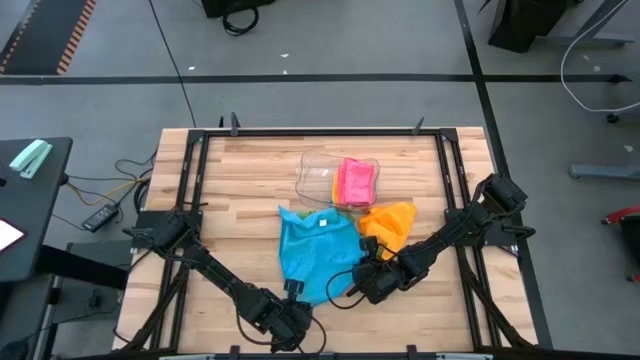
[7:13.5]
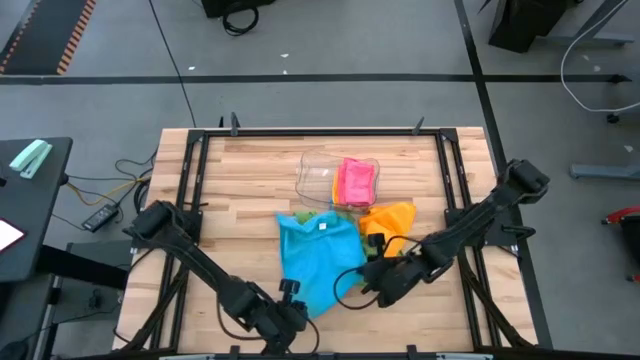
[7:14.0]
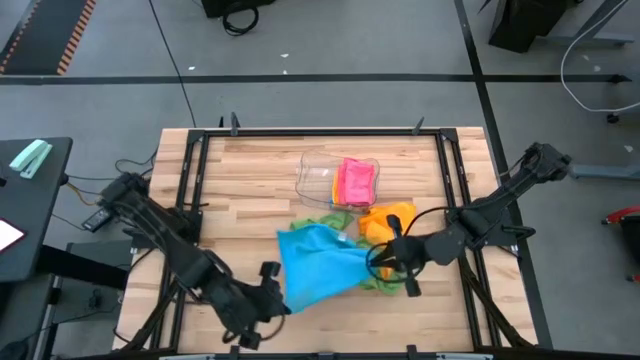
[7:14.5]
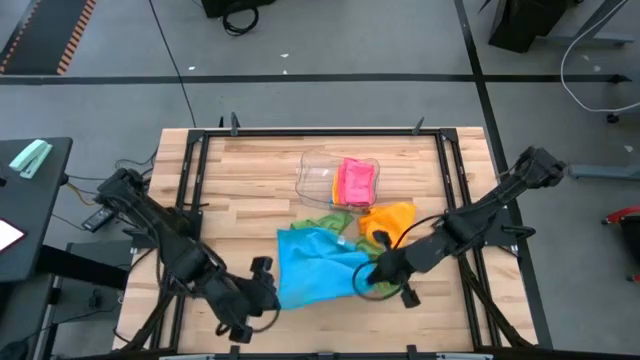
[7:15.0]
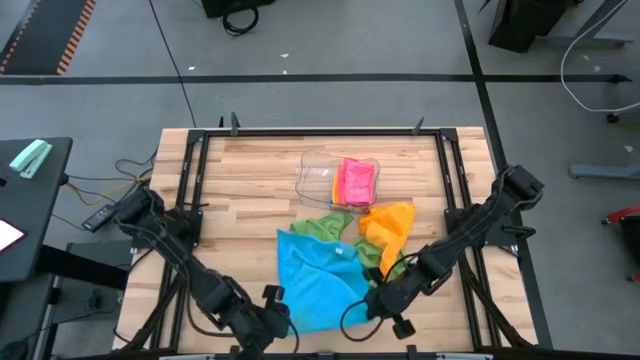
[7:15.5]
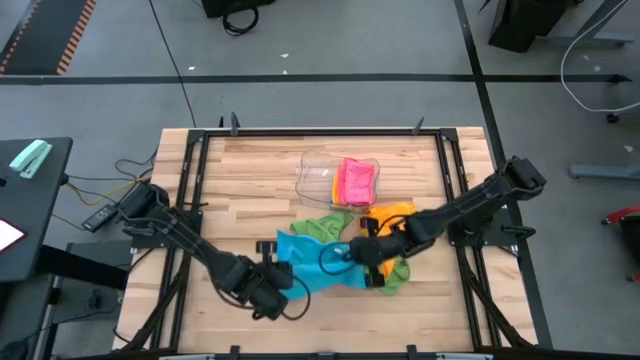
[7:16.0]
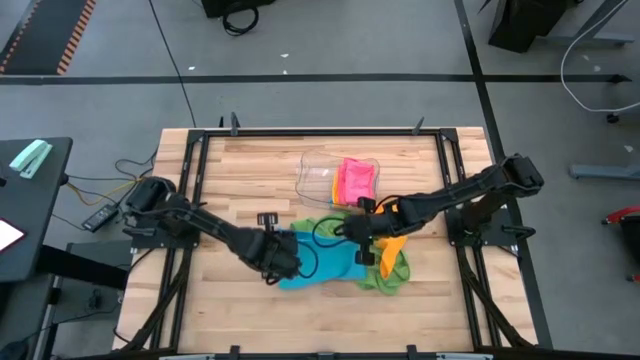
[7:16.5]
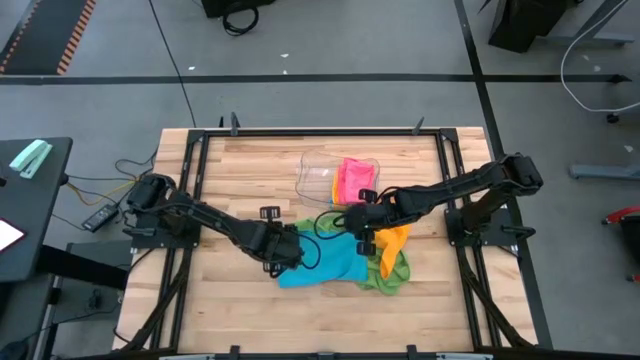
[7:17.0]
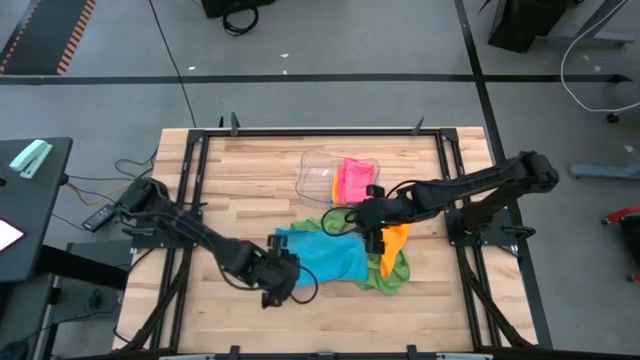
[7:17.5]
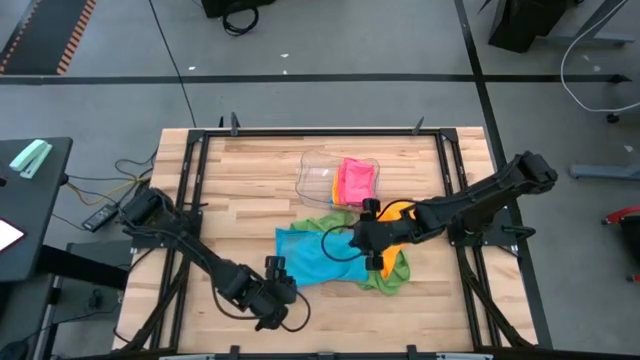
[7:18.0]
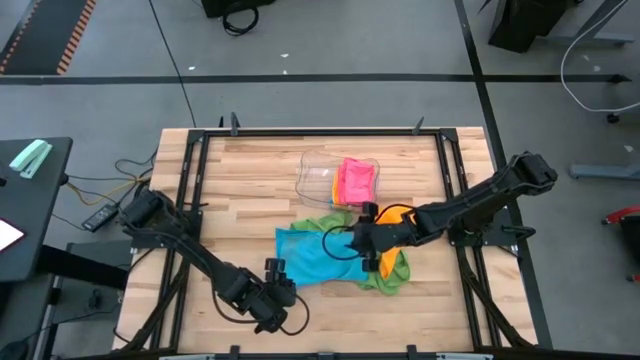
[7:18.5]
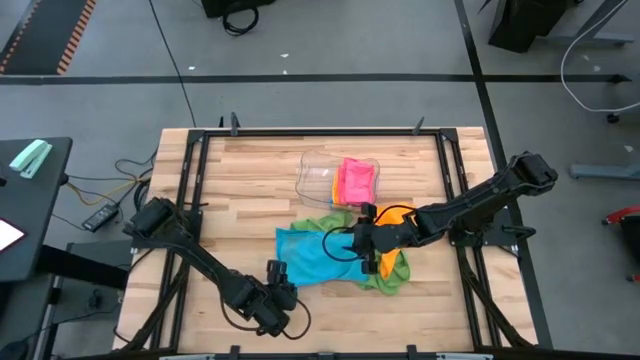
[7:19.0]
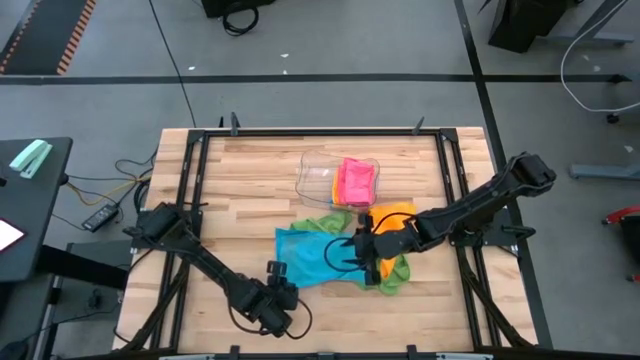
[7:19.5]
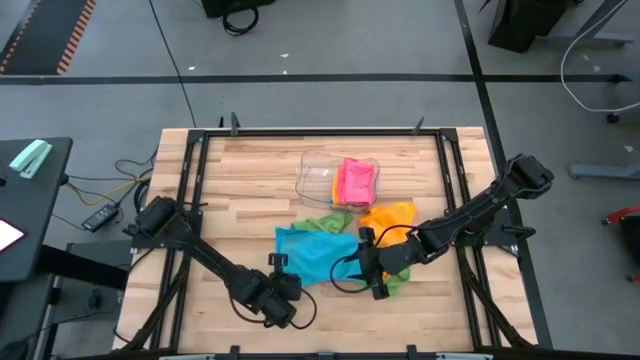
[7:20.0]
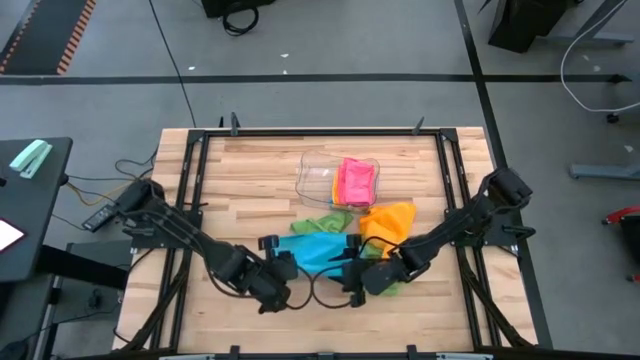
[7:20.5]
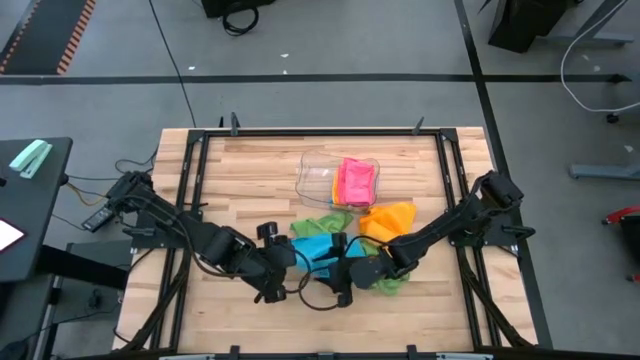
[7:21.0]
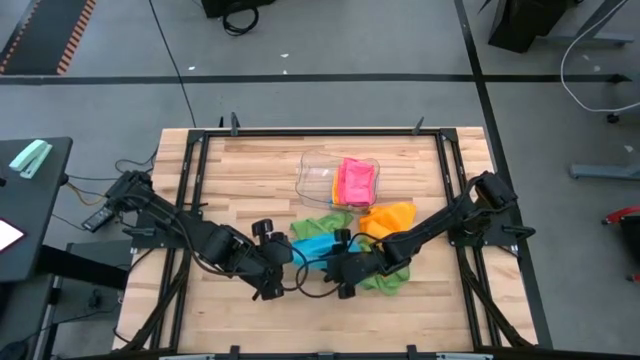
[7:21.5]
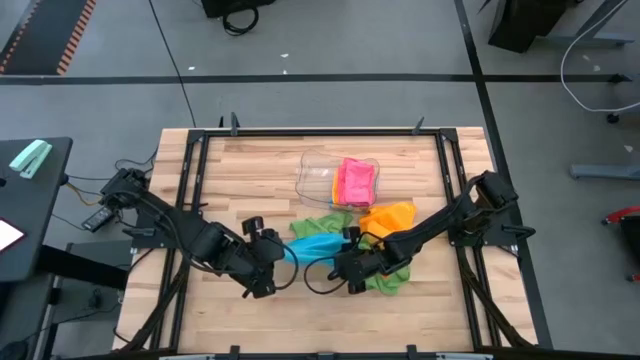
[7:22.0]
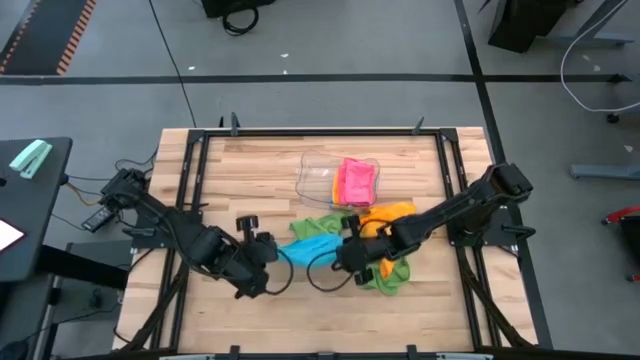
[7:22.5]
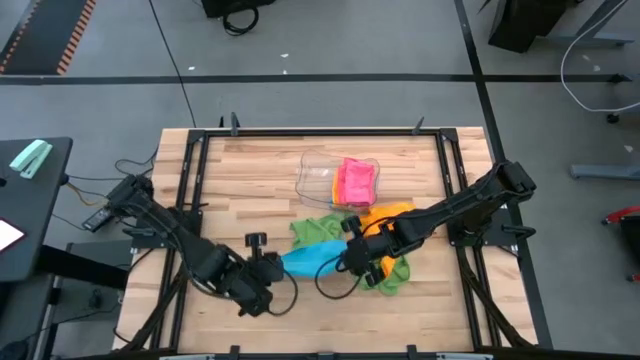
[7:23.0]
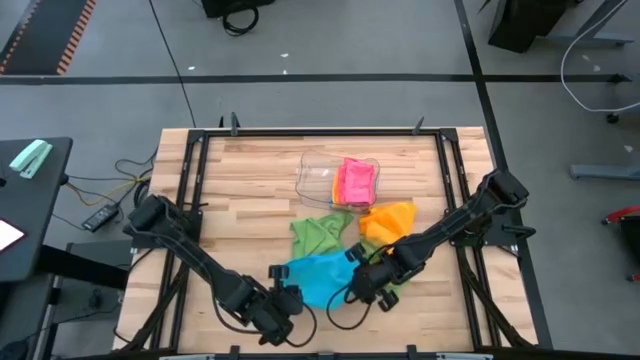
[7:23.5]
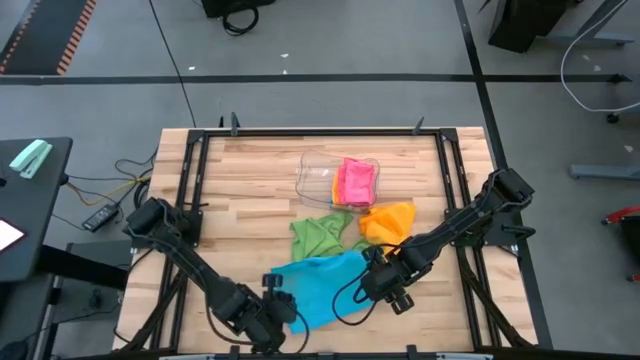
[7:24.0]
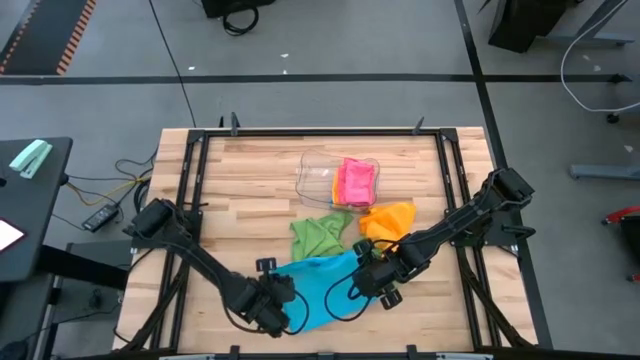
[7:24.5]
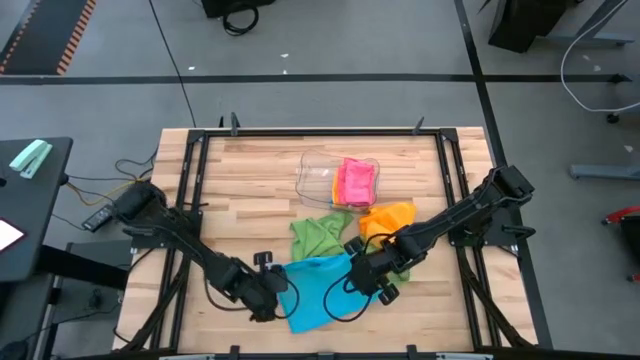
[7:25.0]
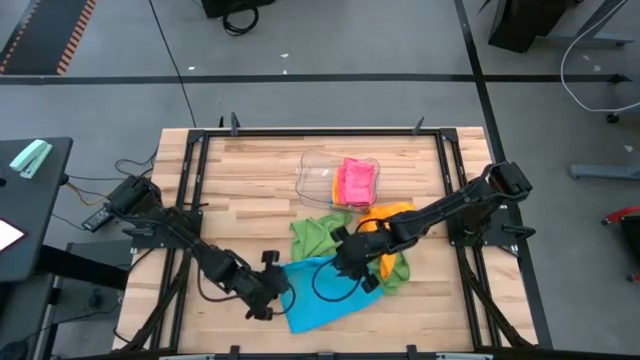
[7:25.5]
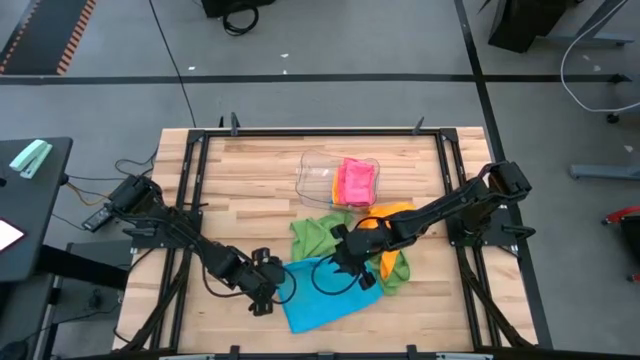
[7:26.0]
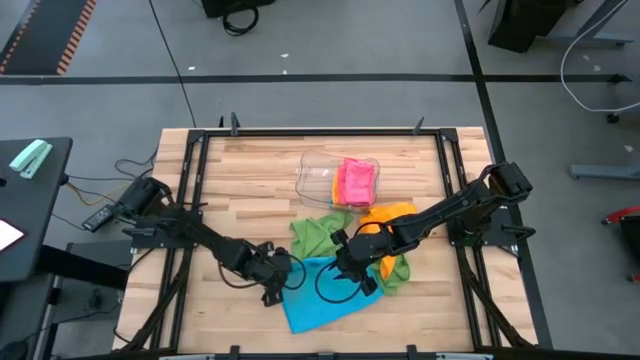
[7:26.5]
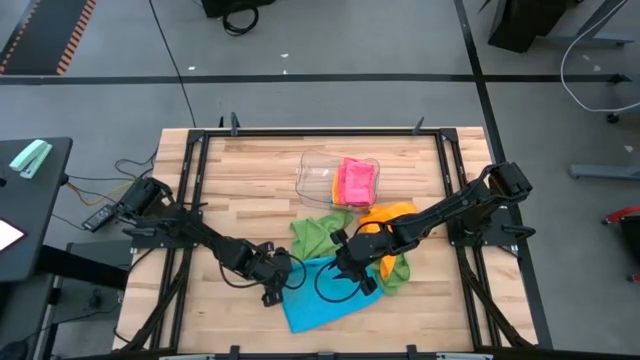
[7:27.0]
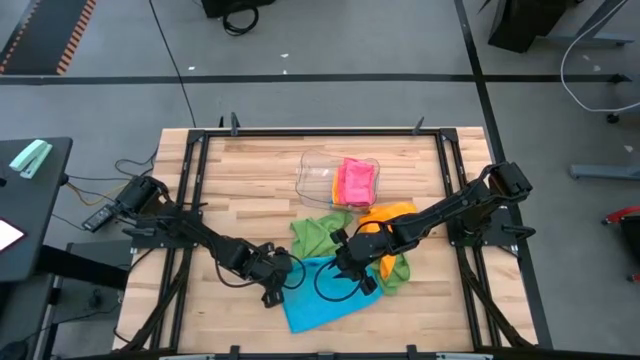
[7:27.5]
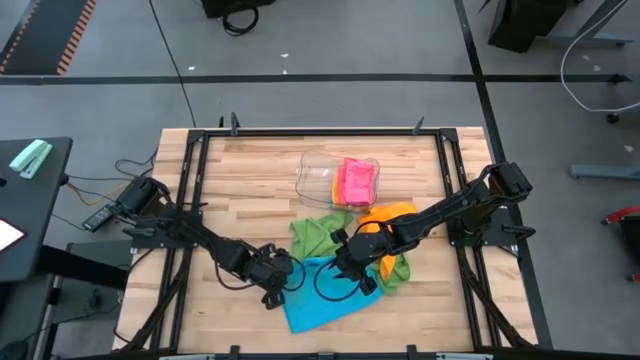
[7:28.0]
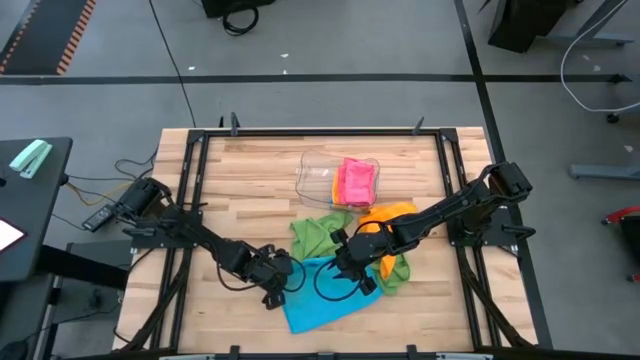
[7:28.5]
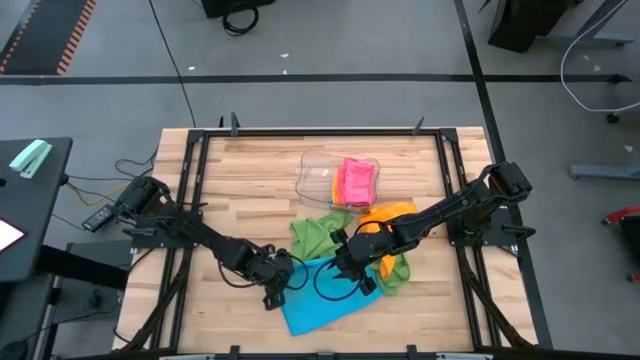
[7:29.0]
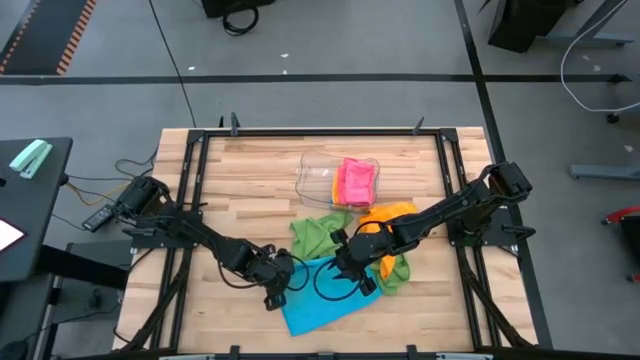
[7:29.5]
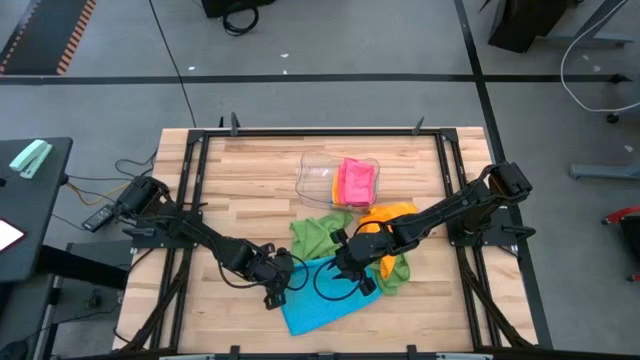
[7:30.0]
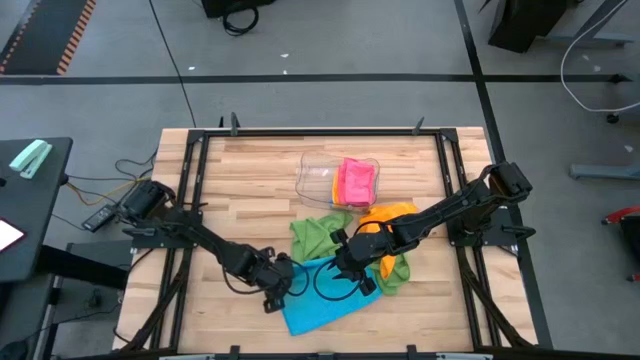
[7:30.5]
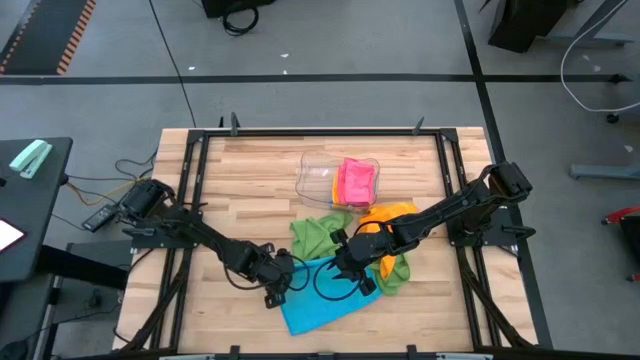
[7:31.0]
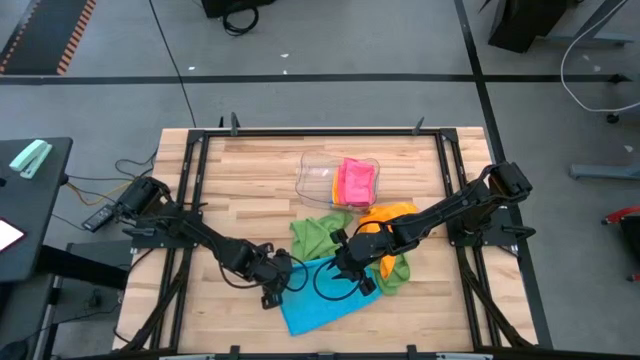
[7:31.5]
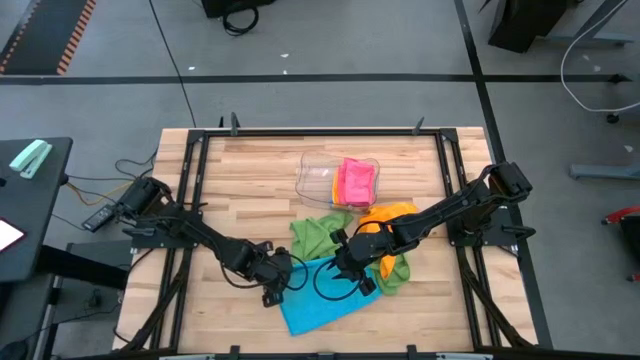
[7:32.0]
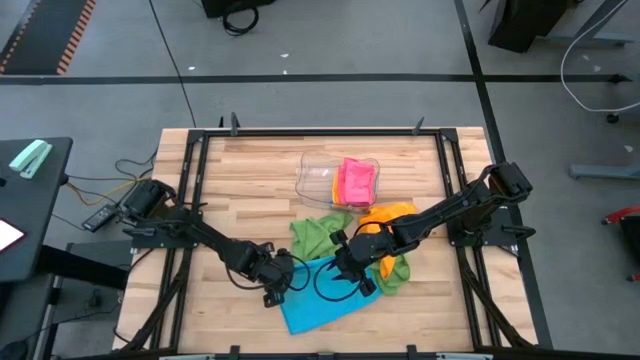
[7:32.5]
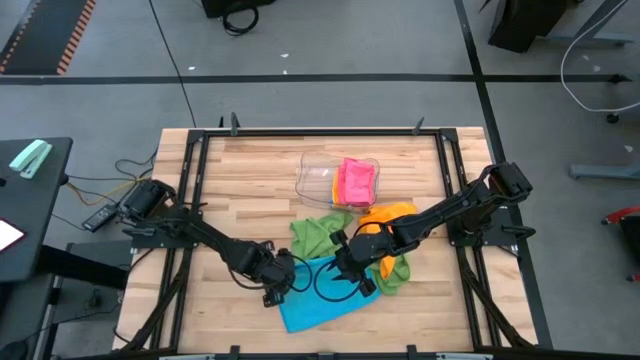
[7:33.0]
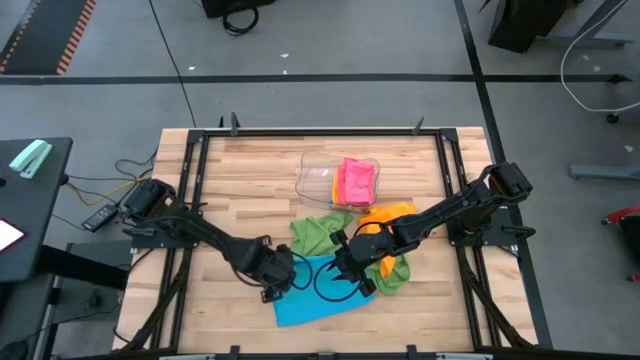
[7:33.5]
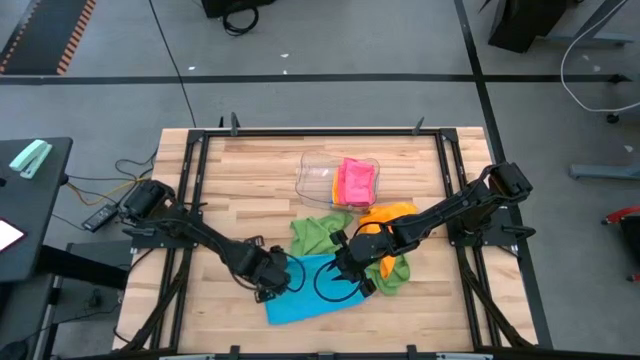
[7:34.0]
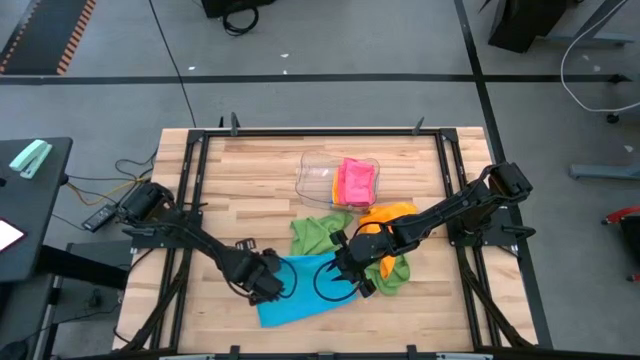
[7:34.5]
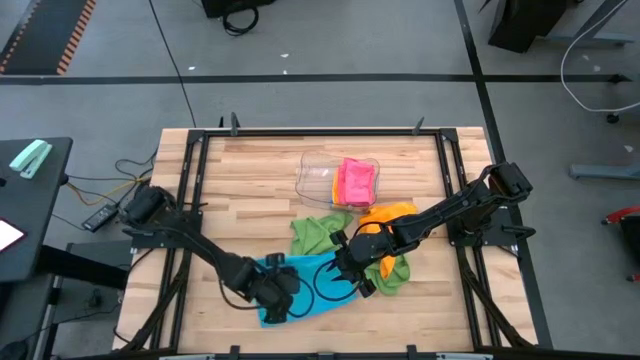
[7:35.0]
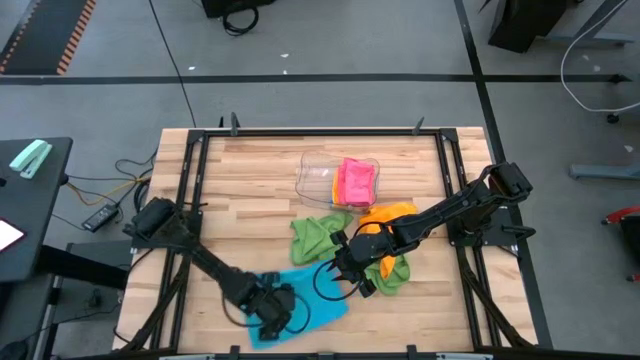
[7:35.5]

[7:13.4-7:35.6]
Task: Fold microfiber towels
Fold the blue microfiber cloth
